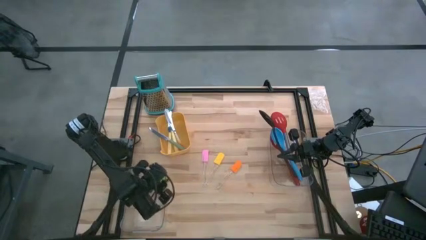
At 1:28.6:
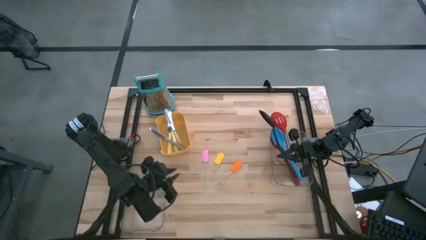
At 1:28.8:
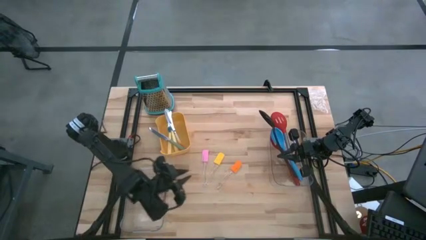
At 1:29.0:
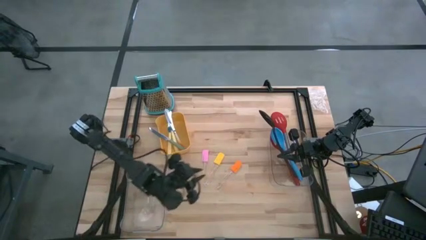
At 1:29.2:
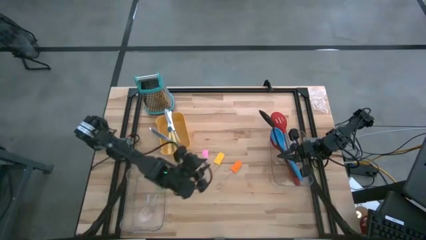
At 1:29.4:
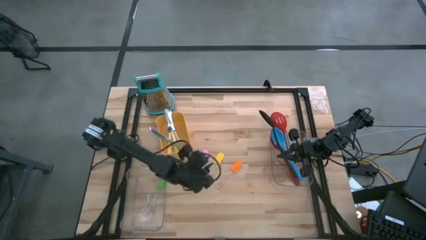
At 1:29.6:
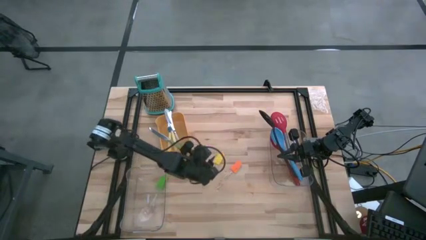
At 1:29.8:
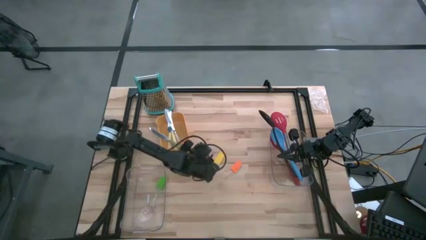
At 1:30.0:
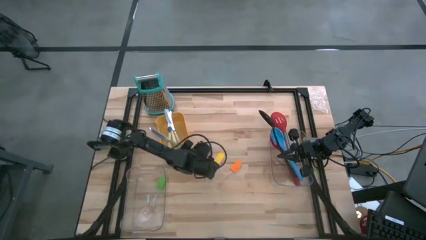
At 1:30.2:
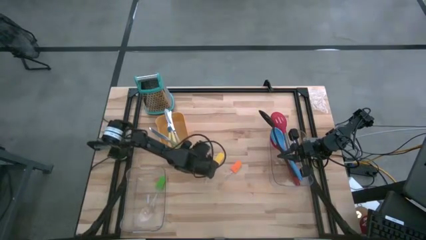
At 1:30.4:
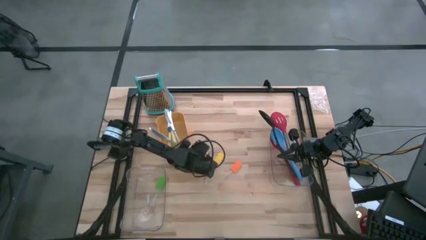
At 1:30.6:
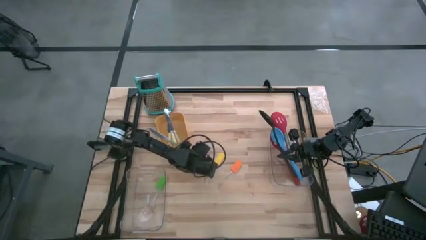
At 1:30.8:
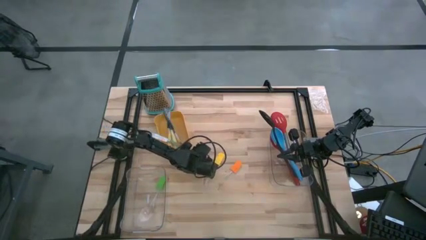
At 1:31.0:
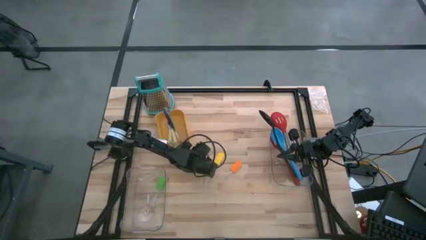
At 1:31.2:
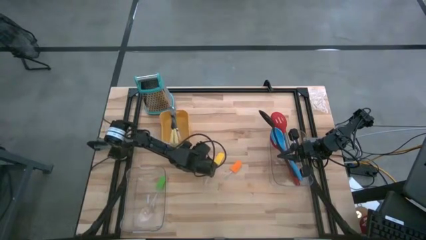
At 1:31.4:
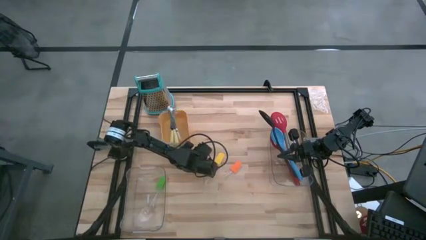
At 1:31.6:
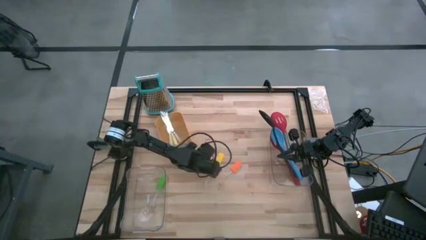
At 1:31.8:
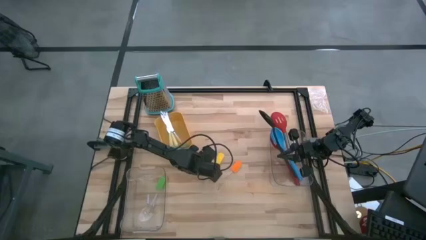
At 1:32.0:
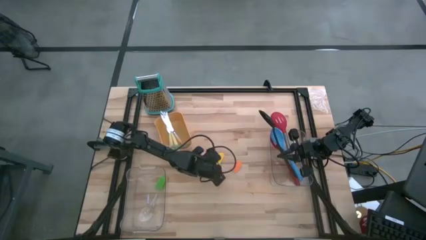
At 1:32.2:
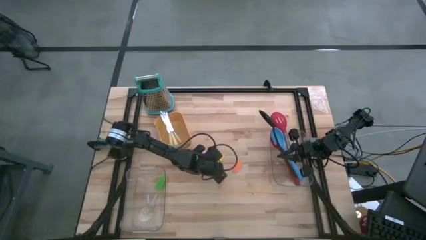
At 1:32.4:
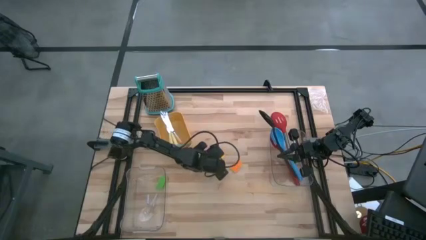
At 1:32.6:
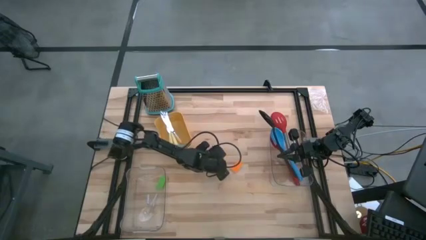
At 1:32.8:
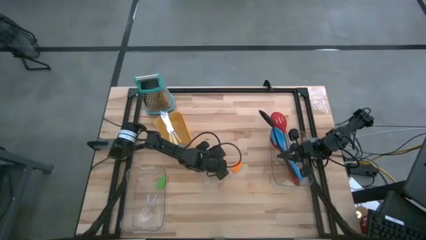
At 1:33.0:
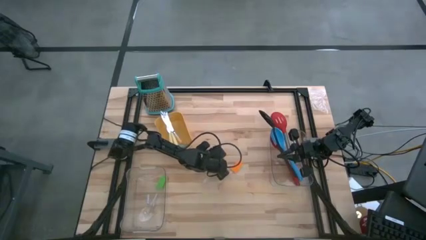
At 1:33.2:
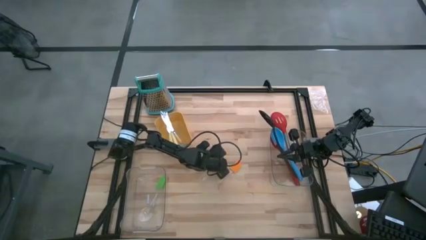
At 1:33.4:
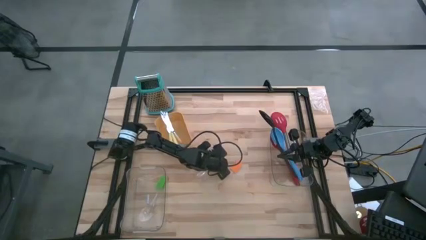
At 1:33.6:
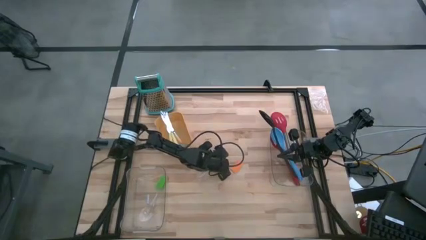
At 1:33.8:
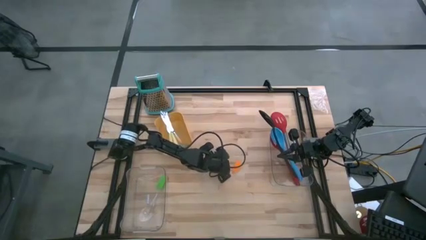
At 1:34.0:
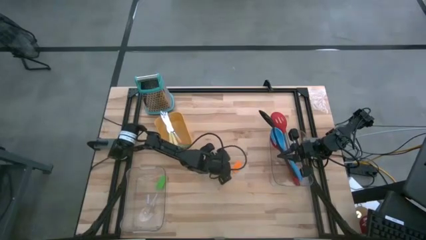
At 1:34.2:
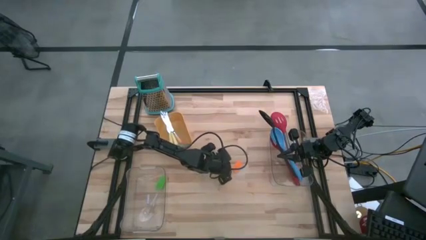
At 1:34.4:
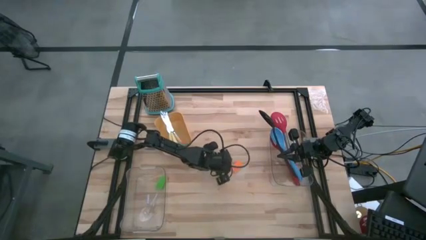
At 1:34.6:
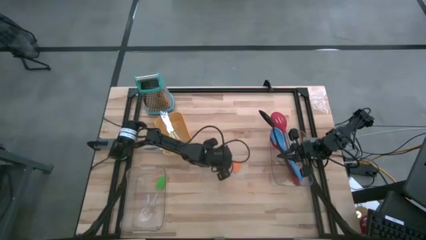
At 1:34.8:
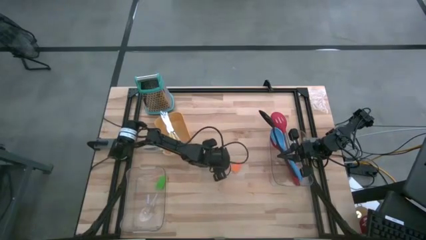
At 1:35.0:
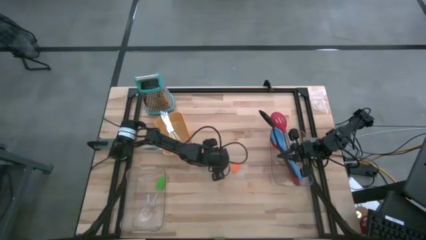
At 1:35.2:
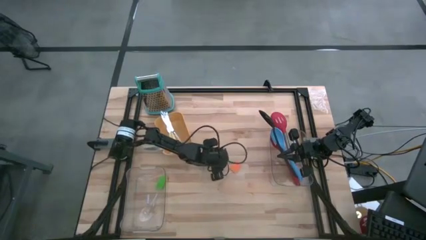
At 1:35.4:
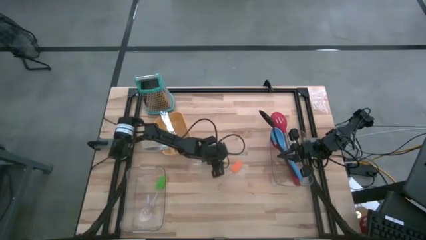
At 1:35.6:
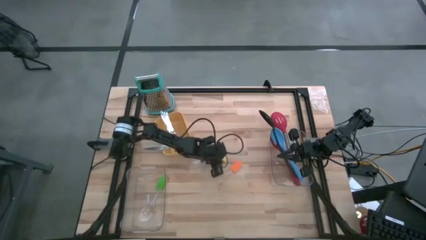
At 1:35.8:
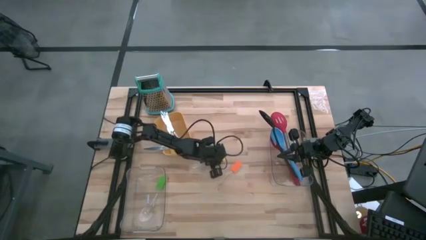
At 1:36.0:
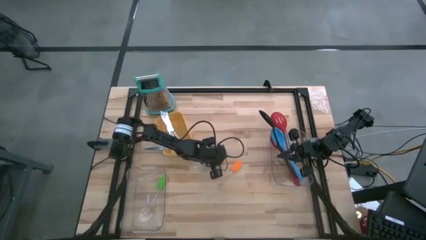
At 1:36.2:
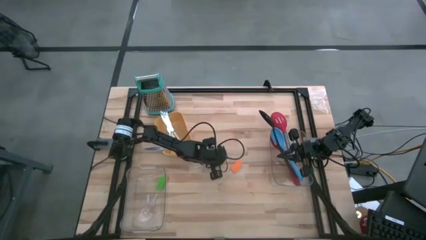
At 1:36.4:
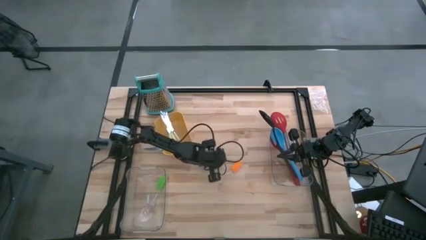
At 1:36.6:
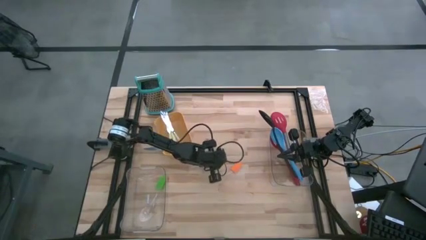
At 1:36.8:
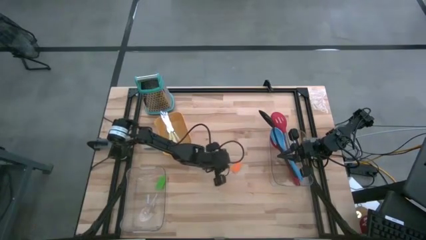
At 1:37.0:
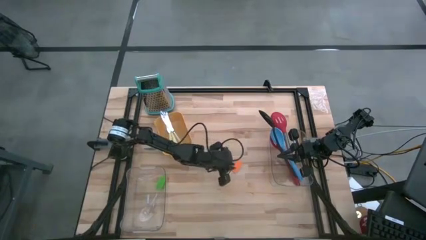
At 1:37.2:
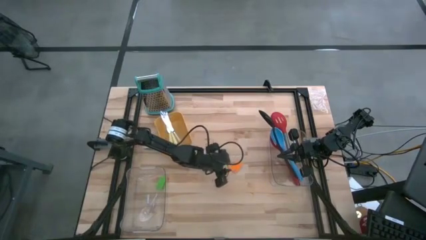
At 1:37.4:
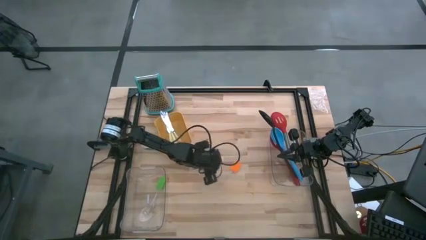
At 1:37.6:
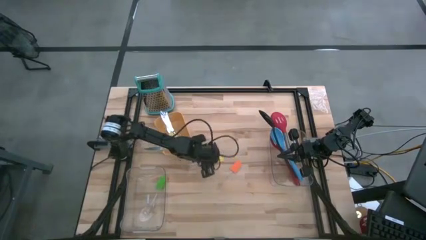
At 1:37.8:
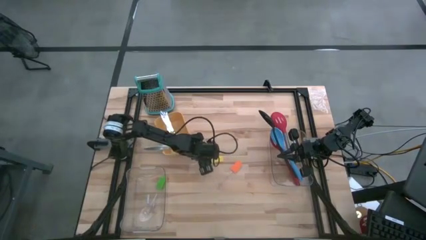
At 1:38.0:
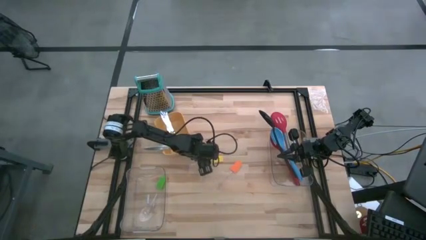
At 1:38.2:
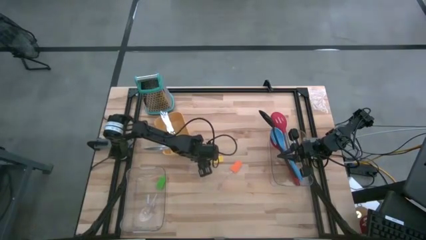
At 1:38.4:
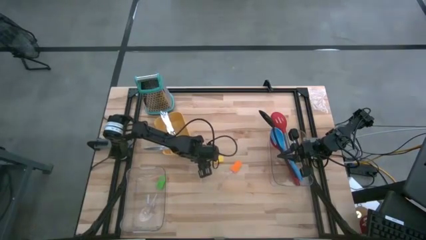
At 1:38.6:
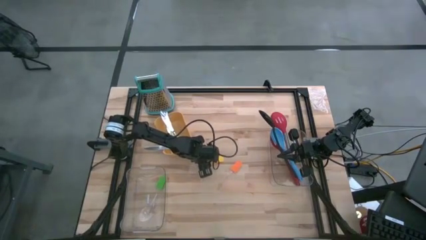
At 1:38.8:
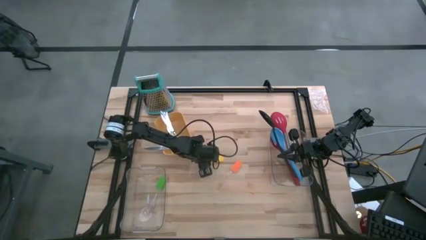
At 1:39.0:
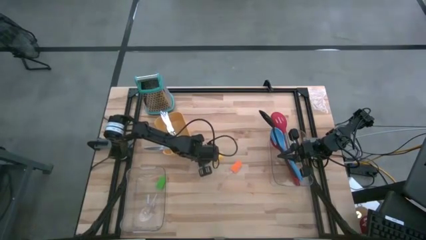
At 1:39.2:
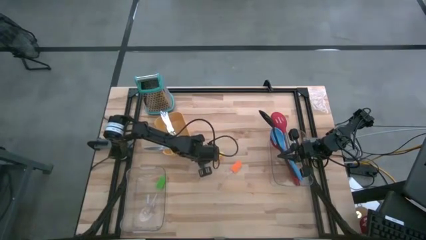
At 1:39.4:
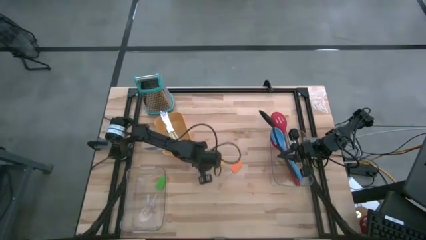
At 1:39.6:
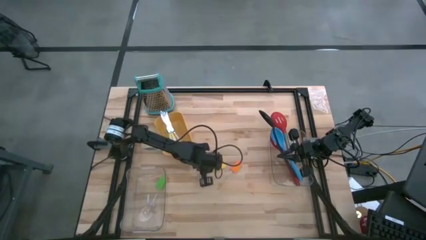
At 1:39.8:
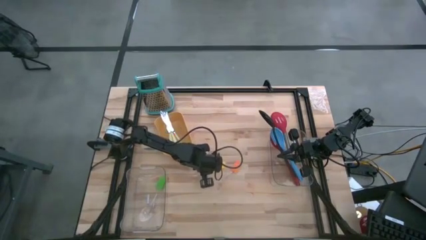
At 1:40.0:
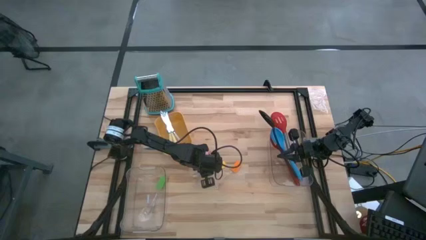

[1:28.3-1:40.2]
Task: Pick & Place Kitchen Items
Put the yellow spatula into the left transparent bin

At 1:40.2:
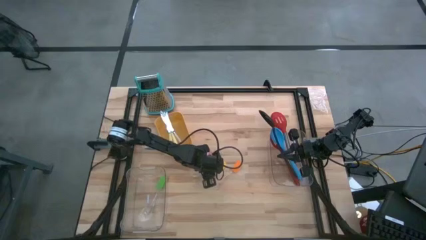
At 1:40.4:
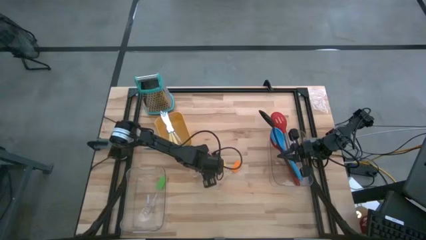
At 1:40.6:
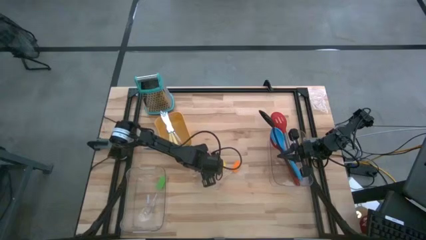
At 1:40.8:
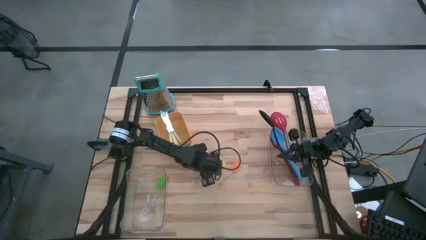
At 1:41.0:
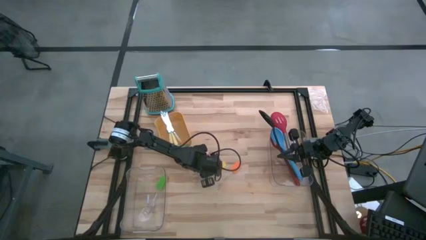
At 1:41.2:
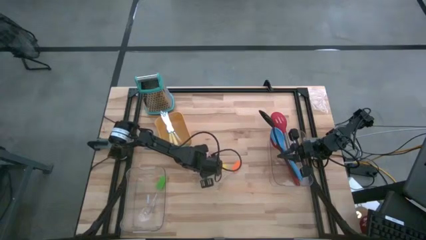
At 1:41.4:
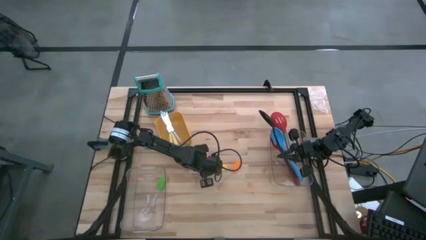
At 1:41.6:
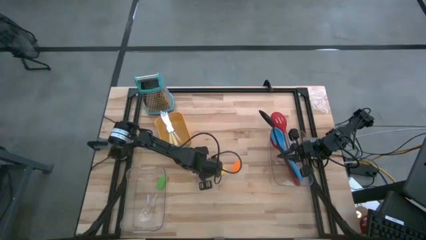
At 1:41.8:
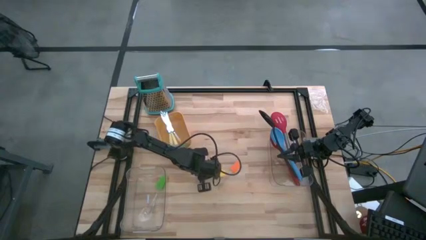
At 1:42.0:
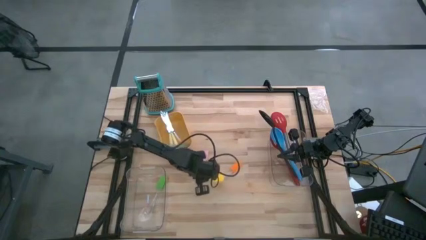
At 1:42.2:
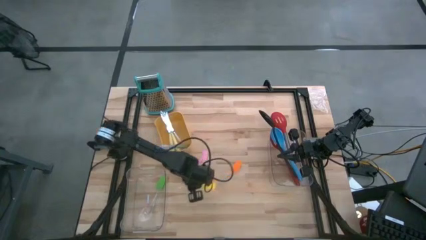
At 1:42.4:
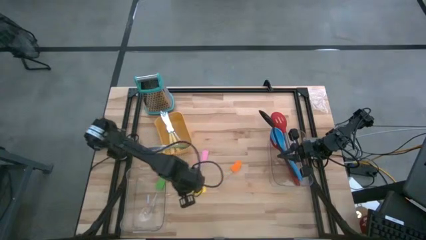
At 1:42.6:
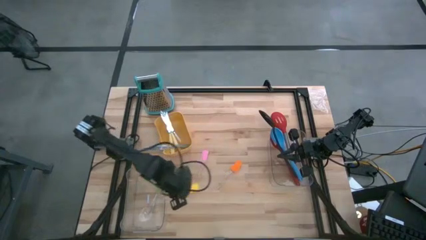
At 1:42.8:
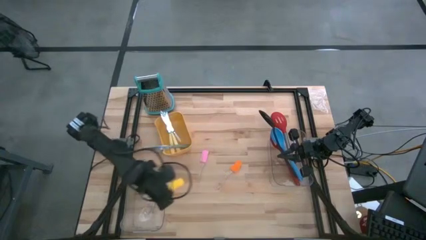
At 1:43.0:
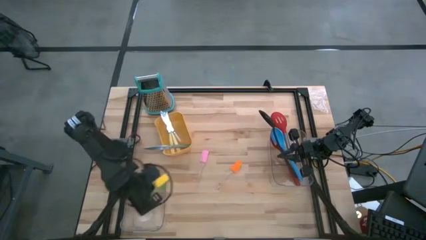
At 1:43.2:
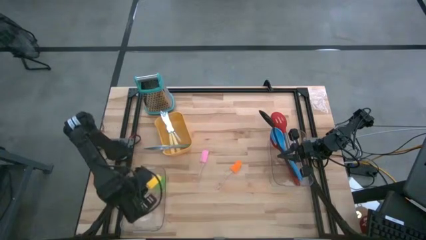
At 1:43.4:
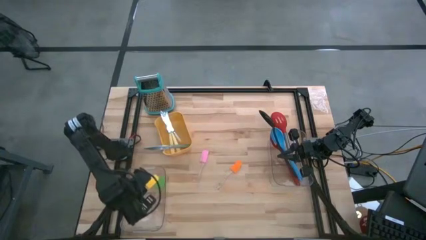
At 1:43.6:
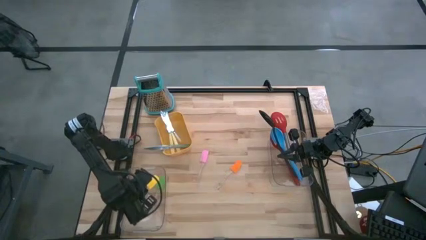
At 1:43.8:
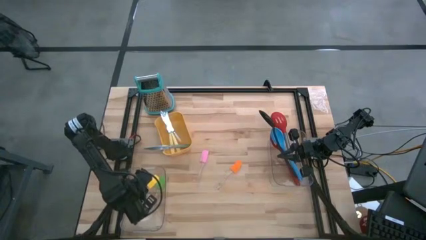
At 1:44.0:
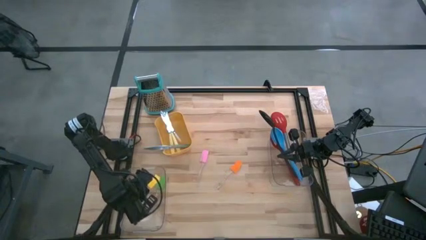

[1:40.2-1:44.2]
Put the yellow spatula into the left transparent bin
